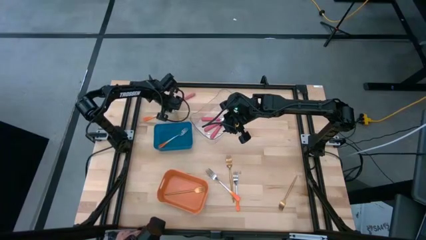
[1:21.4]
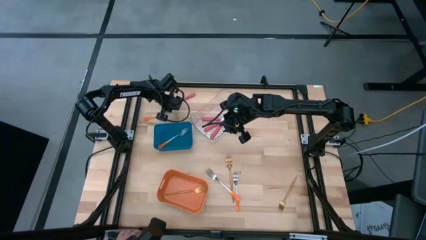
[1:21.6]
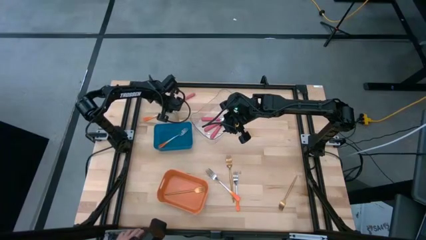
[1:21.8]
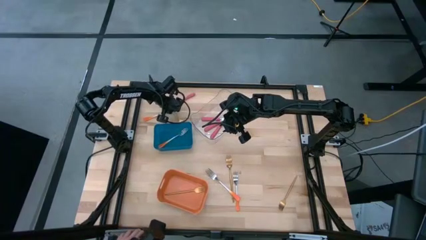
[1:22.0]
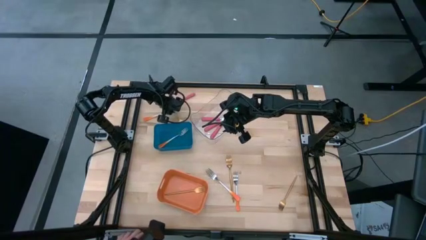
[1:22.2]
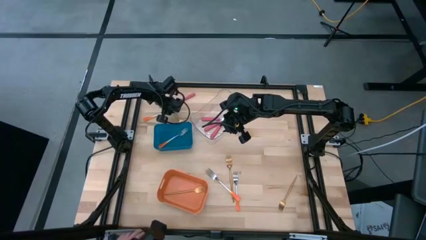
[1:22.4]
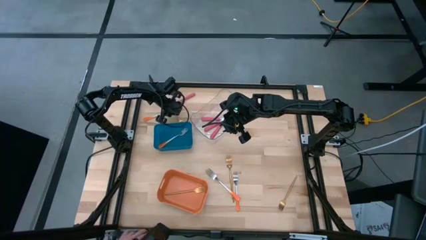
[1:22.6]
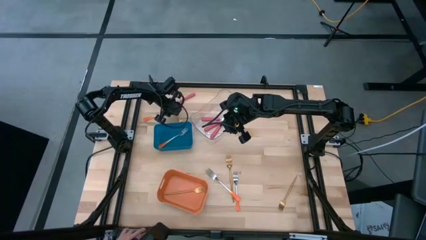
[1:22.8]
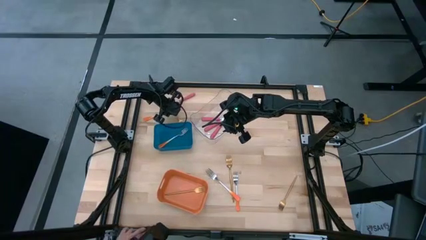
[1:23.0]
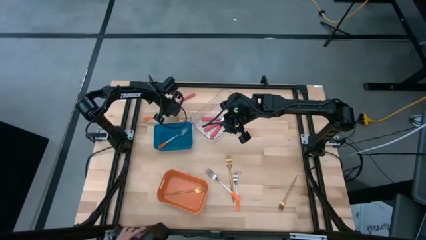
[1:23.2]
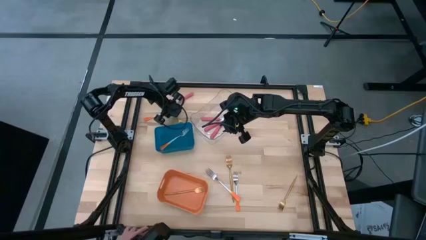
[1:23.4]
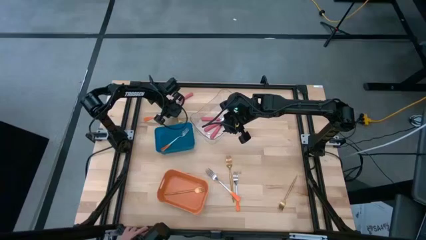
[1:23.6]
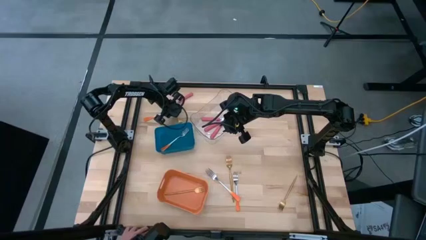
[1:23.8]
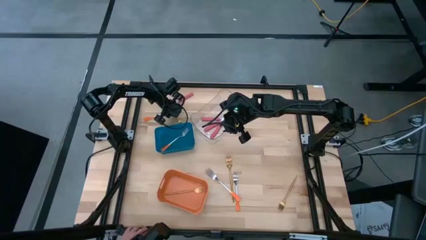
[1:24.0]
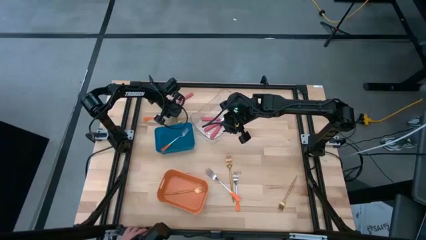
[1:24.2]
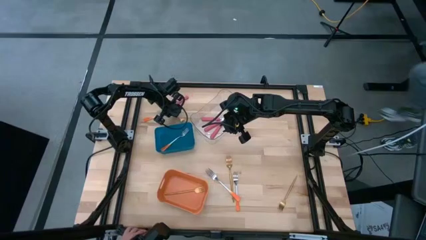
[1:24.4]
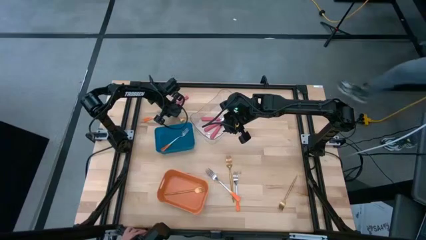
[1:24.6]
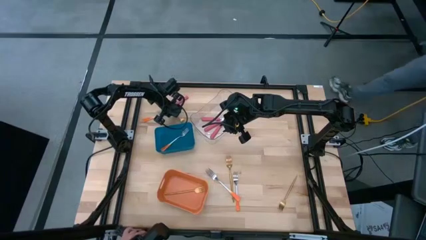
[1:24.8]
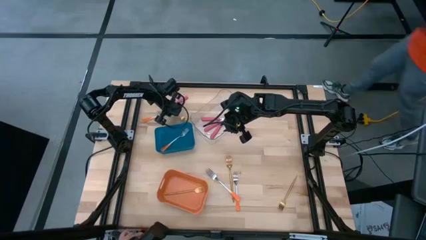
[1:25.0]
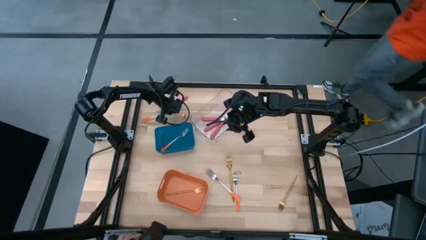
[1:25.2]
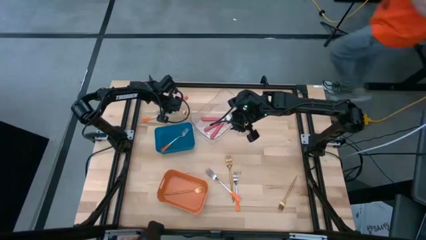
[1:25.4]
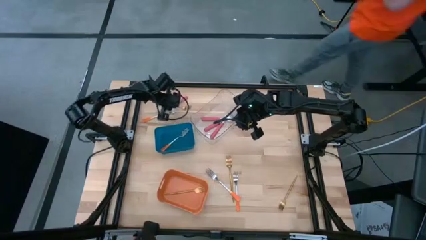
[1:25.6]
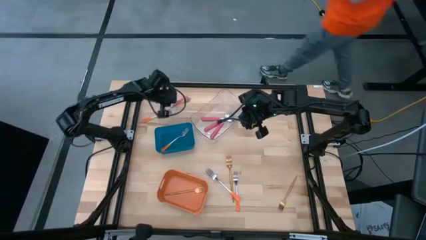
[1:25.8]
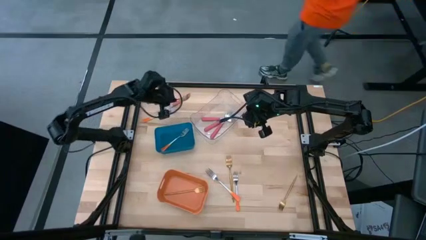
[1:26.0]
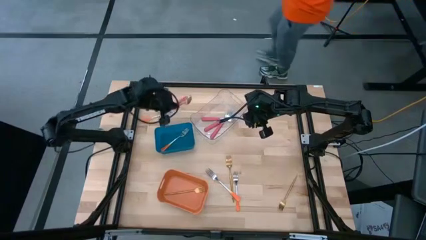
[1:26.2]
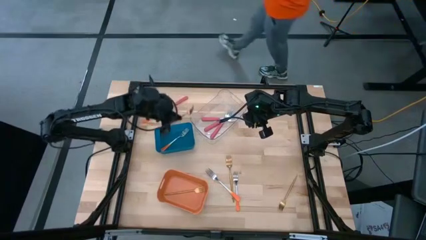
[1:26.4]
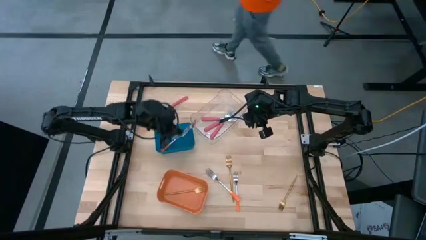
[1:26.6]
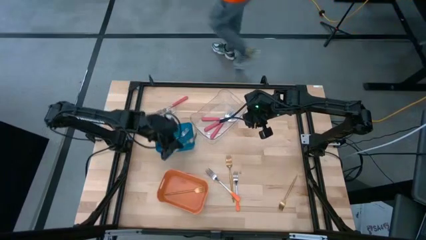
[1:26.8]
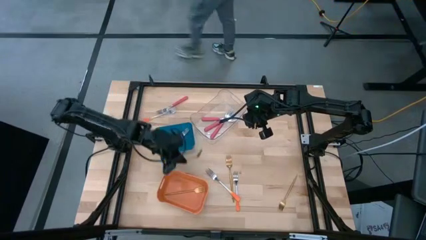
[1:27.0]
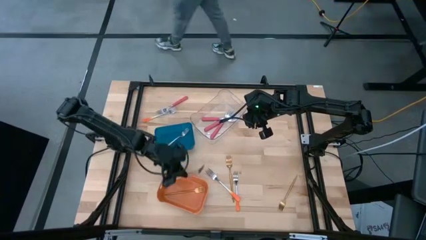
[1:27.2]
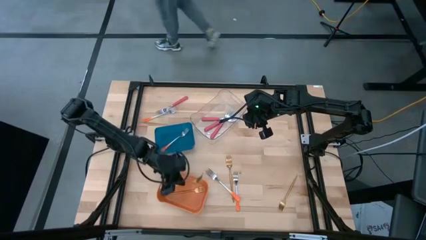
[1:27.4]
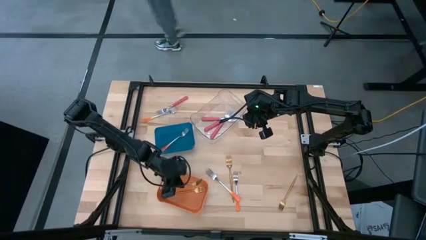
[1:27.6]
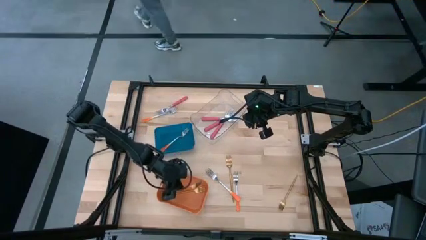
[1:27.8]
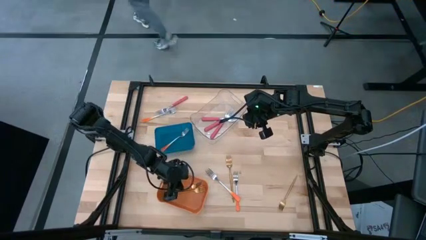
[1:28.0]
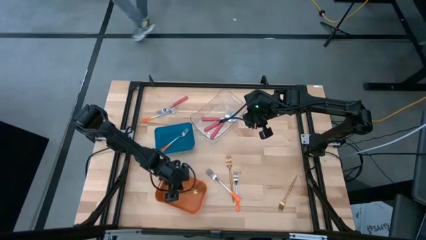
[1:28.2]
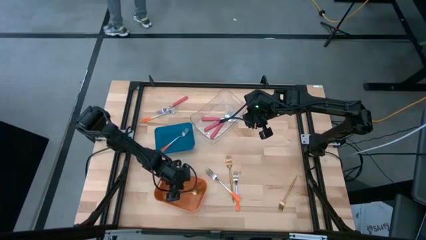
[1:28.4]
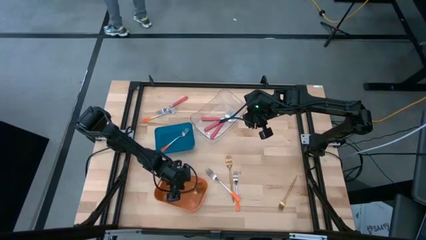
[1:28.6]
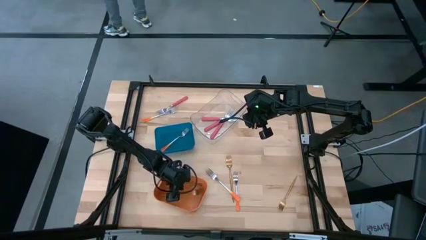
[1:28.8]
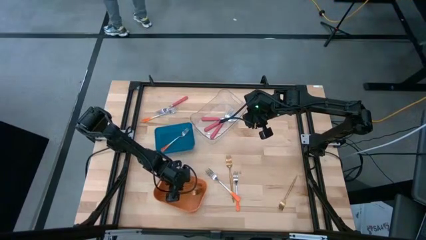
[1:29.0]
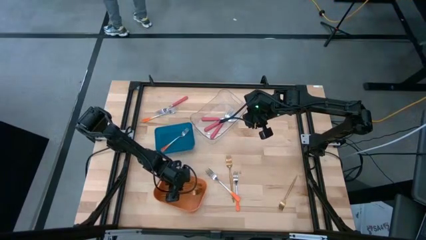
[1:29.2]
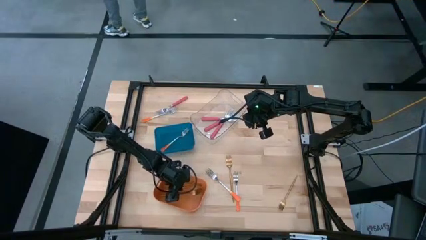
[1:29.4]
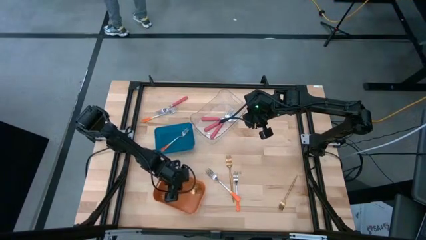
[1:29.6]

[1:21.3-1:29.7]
Task: Sort silverware by color (type)
Put the gold fork into the orange bin

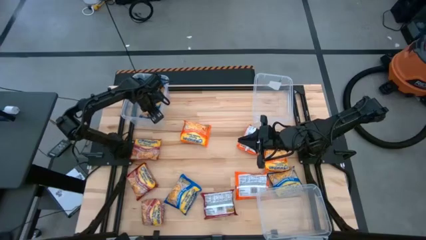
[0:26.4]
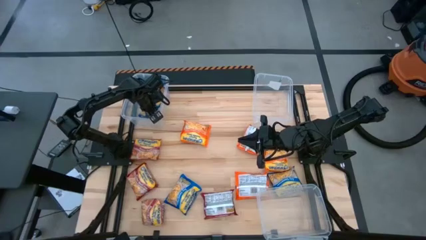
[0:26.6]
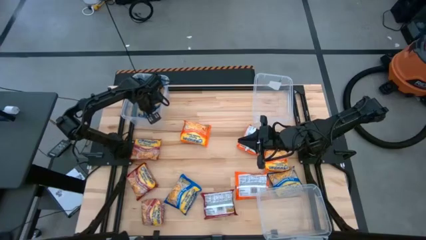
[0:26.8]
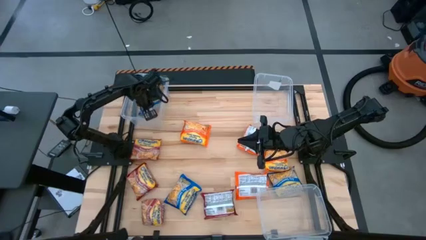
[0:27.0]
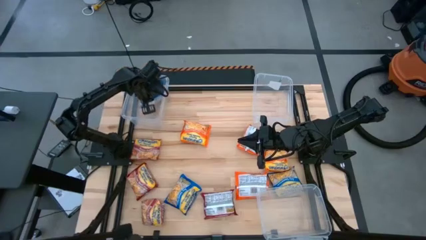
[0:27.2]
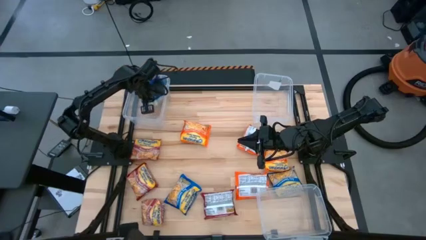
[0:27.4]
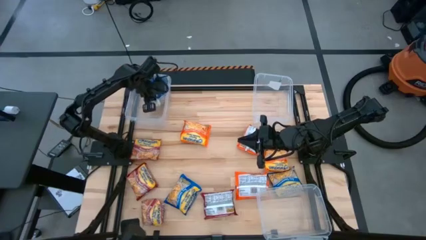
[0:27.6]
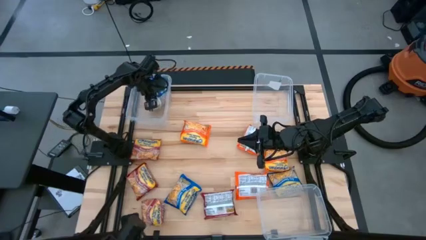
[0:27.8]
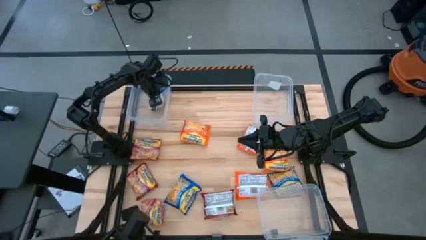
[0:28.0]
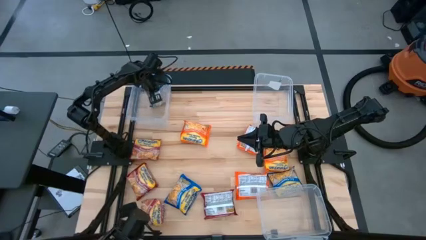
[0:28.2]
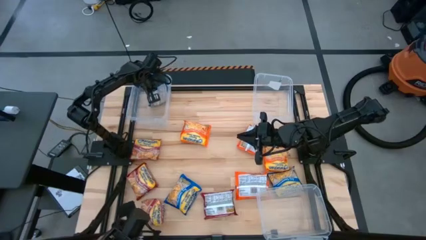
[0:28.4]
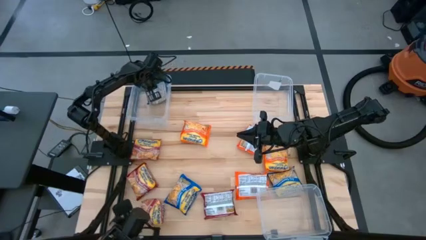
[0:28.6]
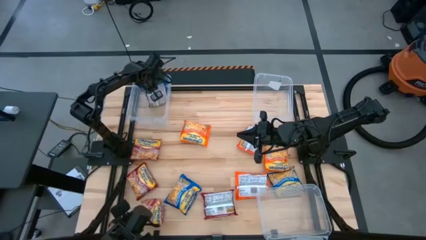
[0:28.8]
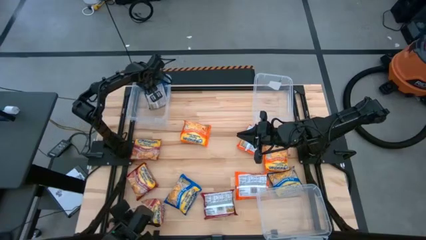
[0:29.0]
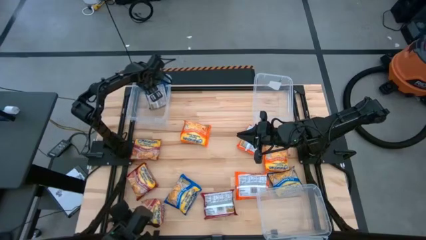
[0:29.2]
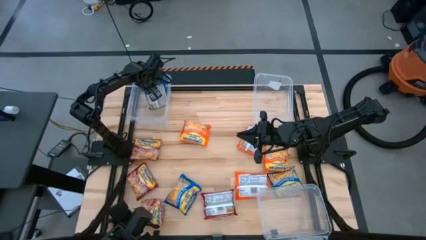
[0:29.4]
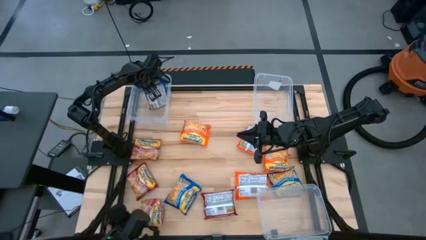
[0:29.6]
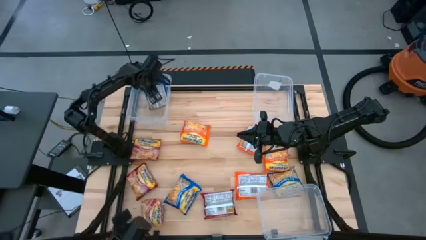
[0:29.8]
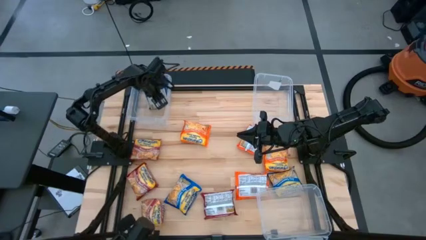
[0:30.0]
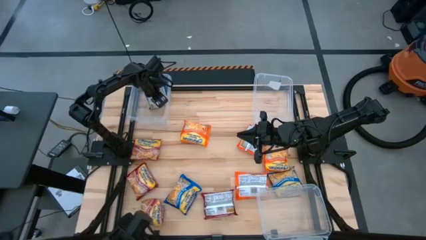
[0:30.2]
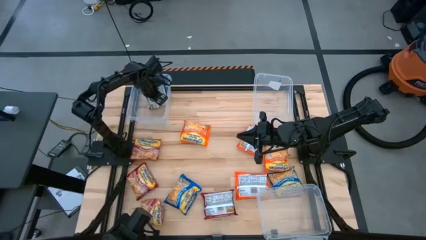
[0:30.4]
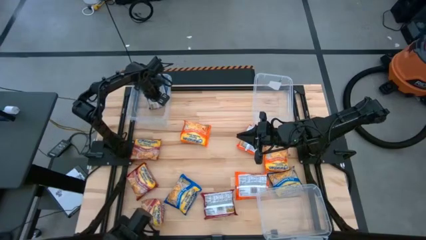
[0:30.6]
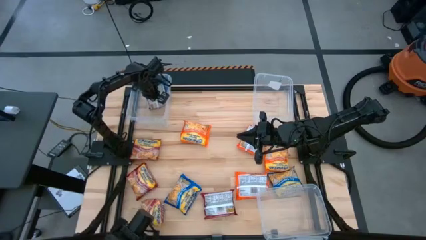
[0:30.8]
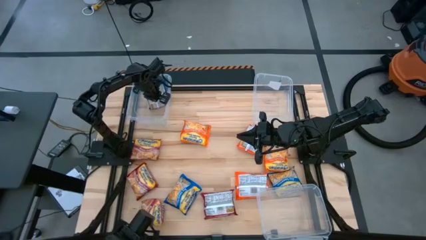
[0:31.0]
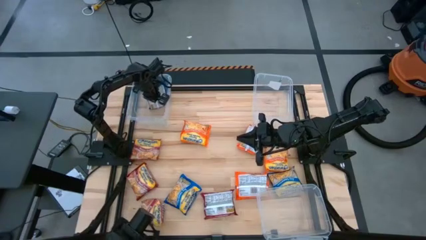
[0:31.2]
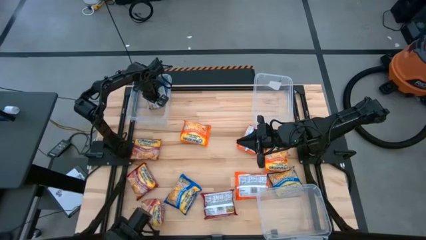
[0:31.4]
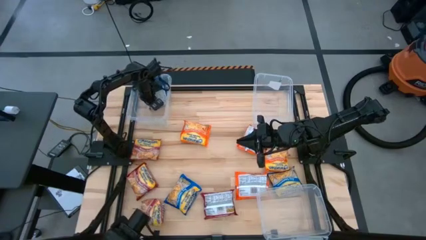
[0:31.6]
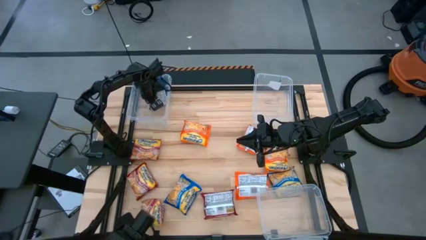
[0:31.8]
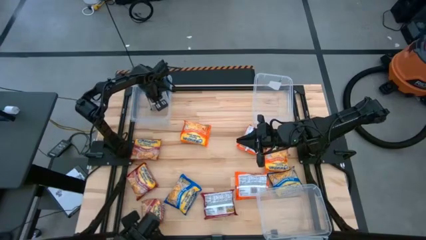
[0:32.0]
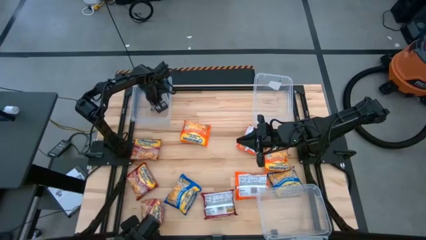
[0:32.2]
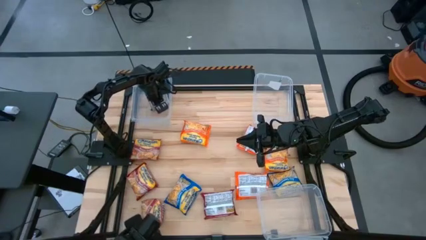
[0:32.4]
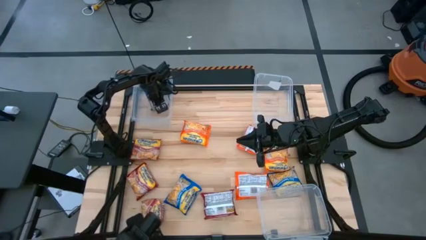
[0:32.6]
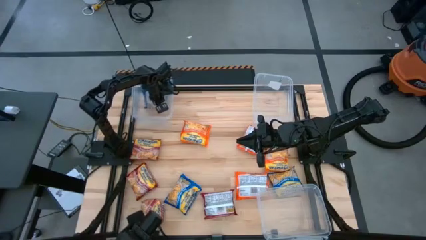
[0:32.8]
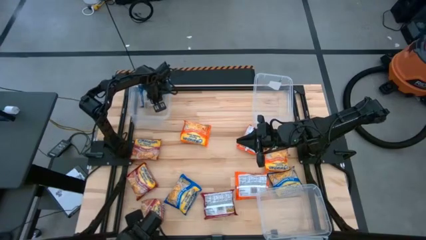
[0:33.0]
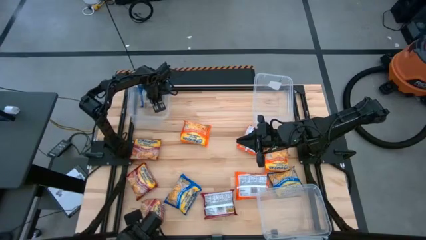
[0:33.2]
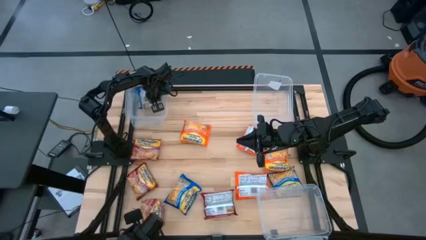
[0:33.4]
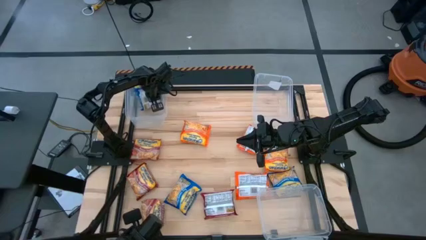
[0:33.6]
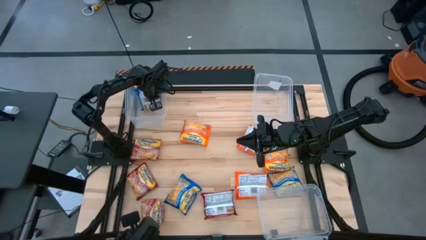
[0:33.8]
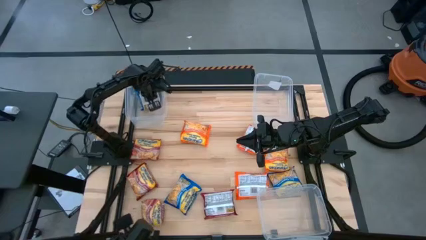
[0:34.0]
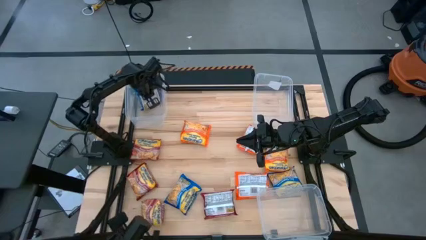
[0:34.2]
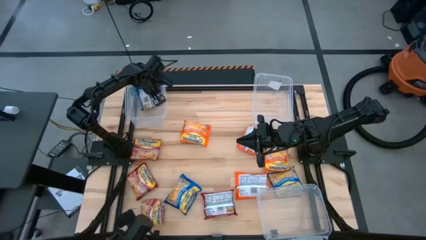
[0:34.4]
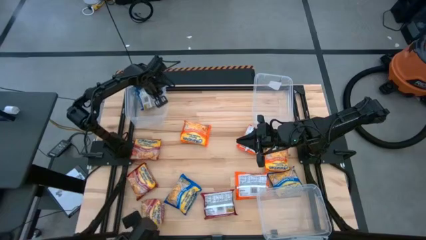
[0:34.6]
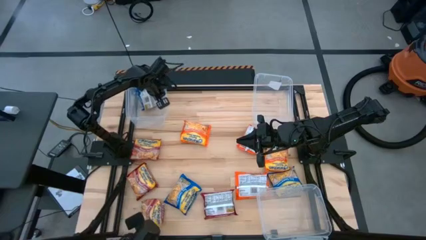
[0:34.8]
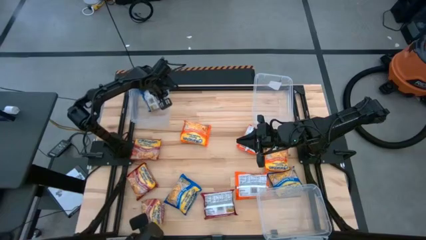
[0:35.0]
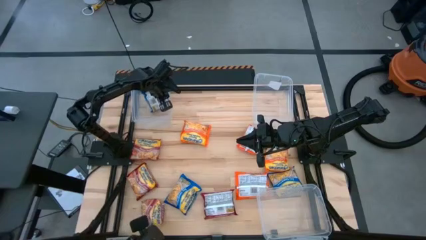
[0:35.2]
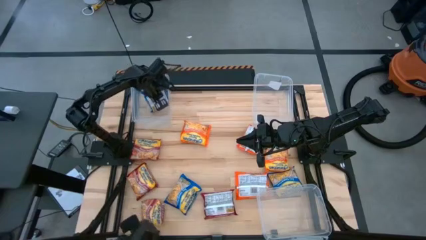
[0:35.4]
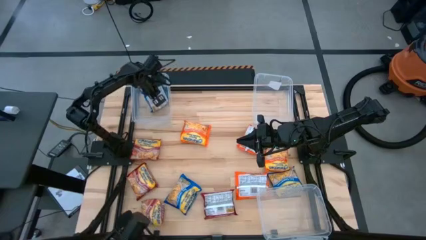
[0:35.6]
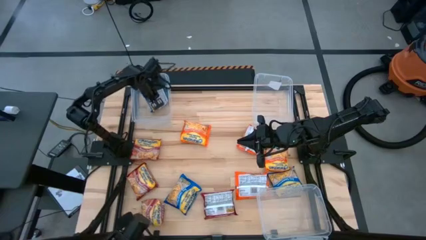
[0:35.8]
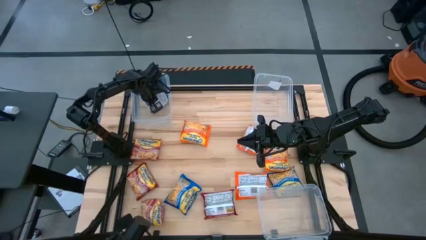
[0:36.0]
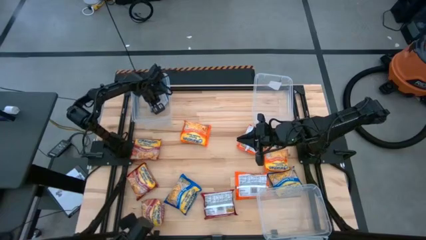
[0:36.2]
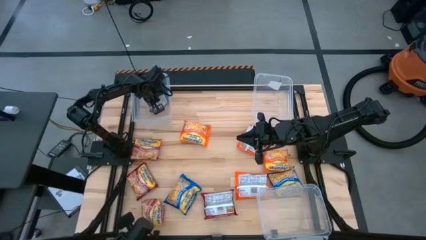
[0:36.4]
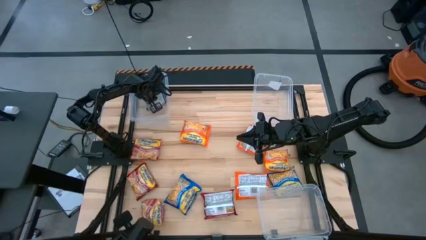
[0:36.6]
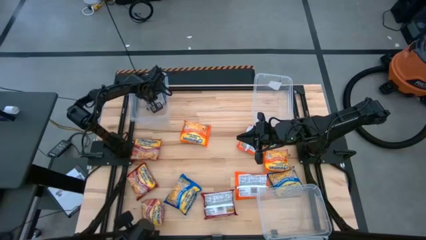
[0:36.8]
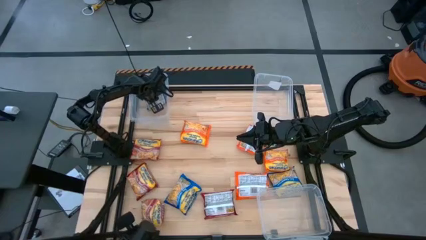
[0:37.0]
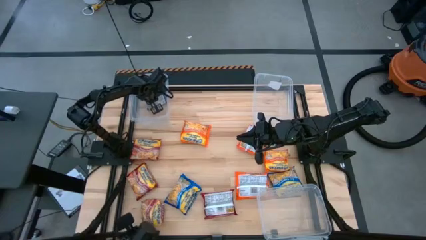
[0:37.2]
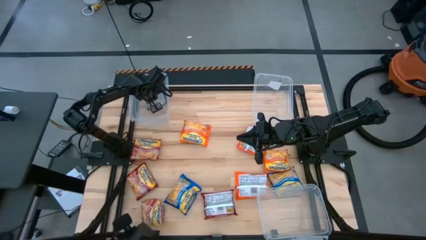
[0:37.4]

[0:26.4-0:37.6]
Task: Sort Maruchan noodles
Put the blue noodle pack into the top left transparent bin
